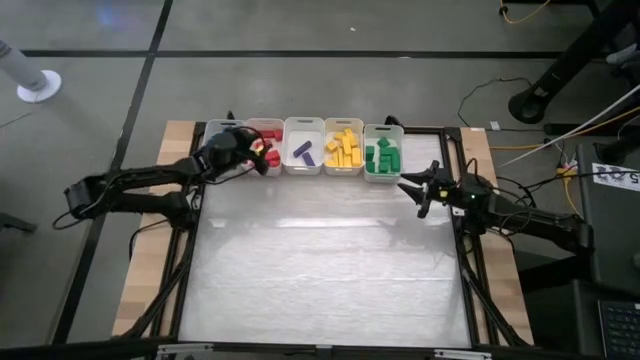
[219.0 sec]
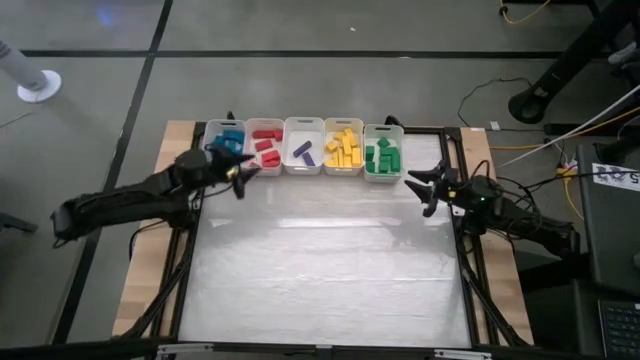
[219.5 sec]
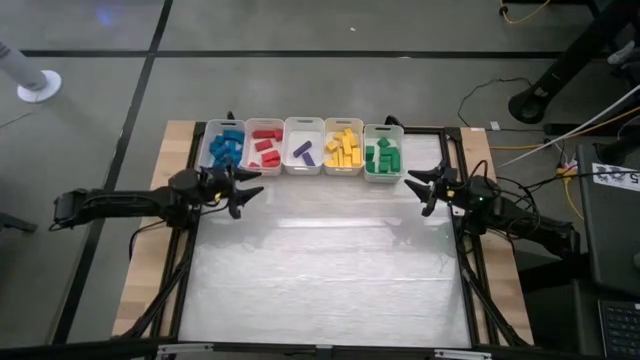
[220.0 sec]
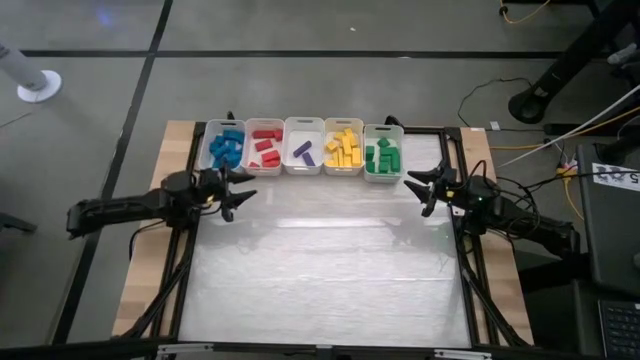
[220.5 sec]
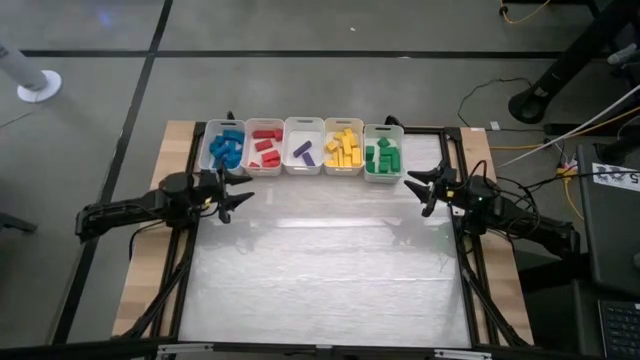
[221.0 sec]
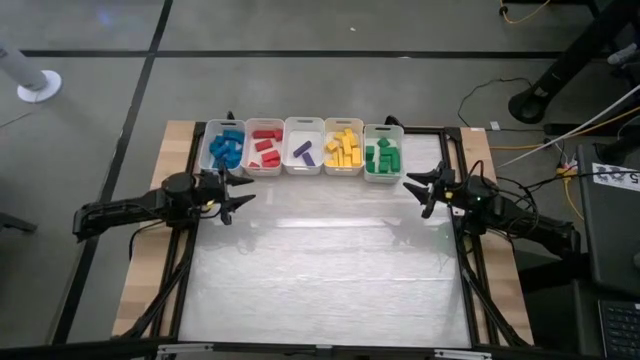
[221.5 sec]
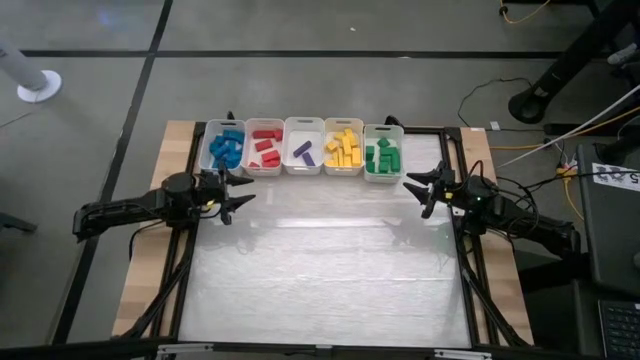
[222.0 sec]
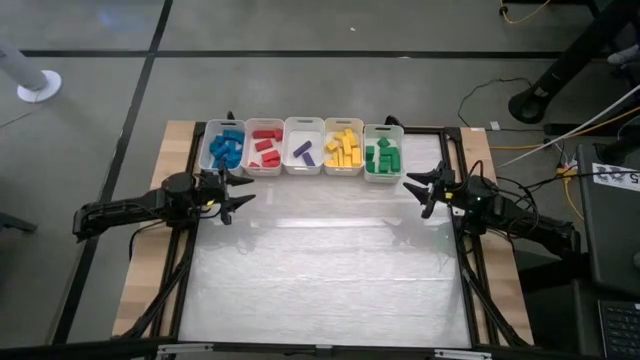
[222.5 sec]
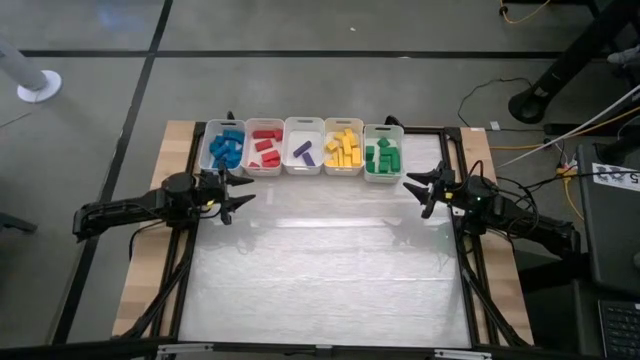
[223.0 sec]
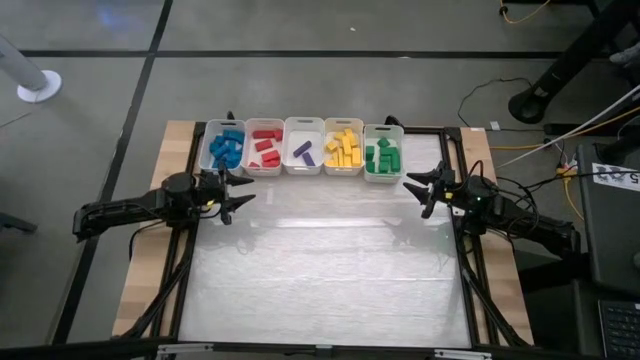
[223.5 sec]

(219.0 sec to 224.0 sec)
Task: Sort blocks
Return to Home Position

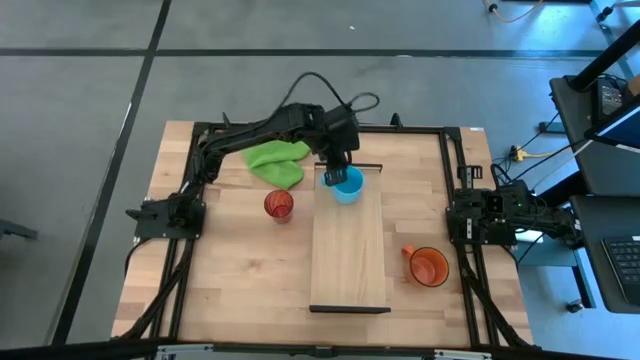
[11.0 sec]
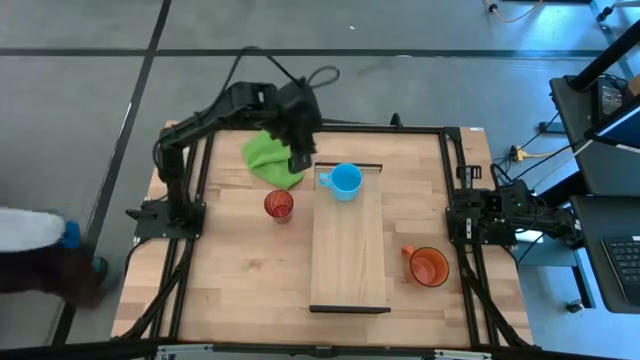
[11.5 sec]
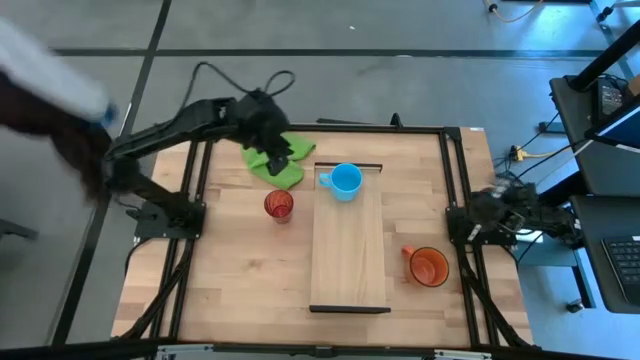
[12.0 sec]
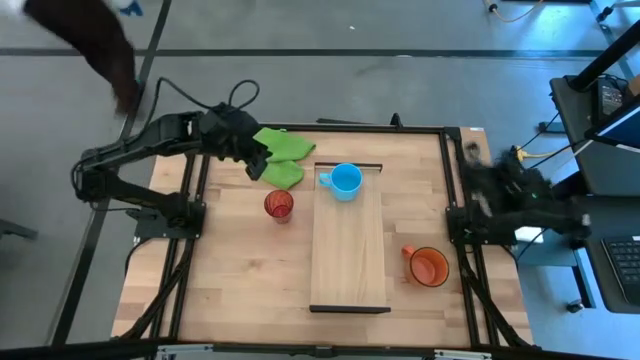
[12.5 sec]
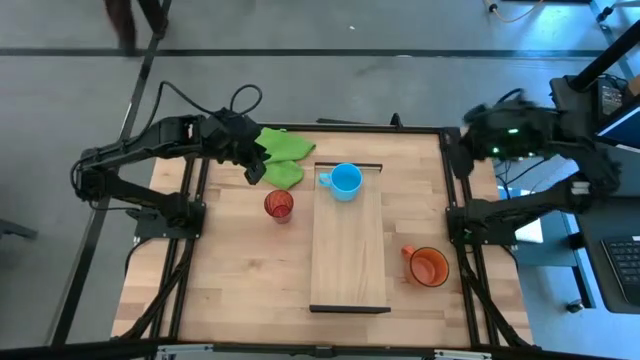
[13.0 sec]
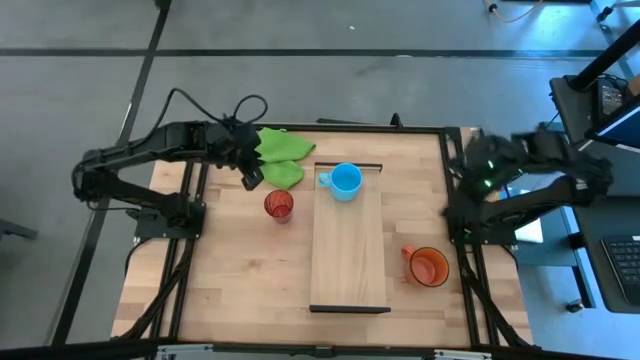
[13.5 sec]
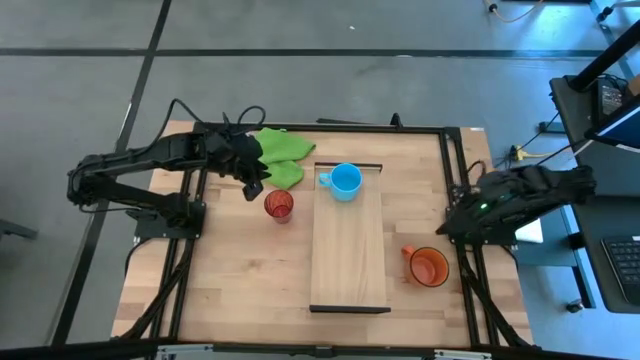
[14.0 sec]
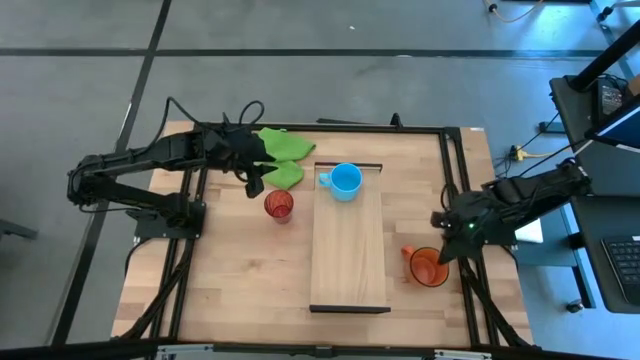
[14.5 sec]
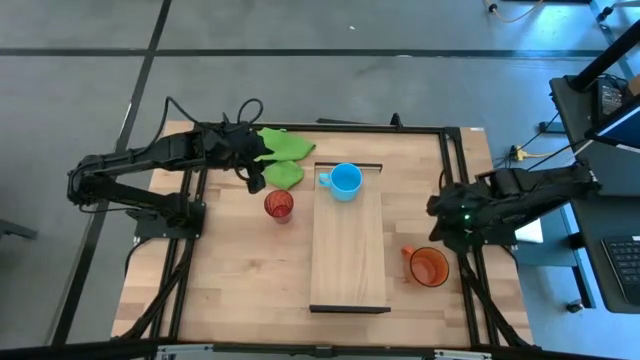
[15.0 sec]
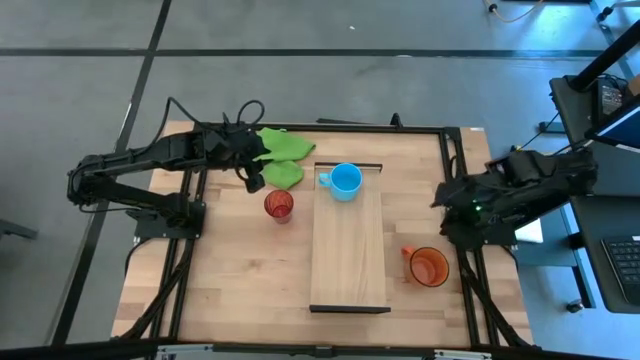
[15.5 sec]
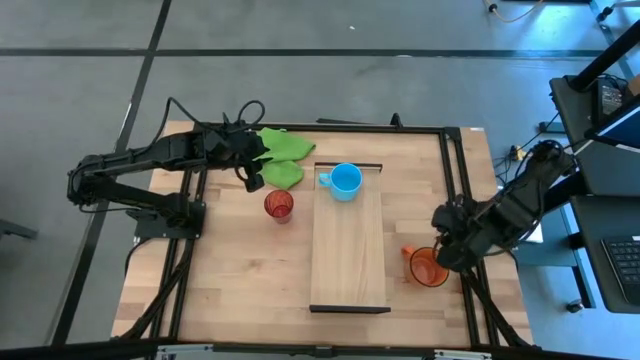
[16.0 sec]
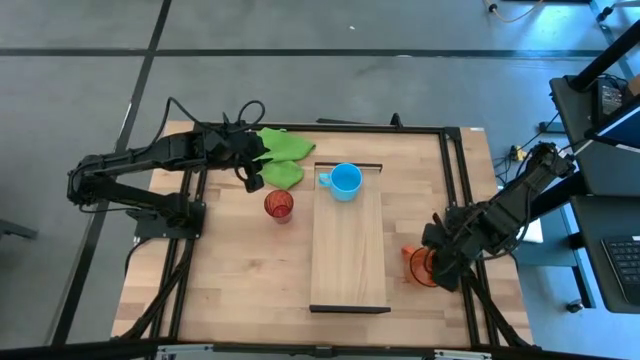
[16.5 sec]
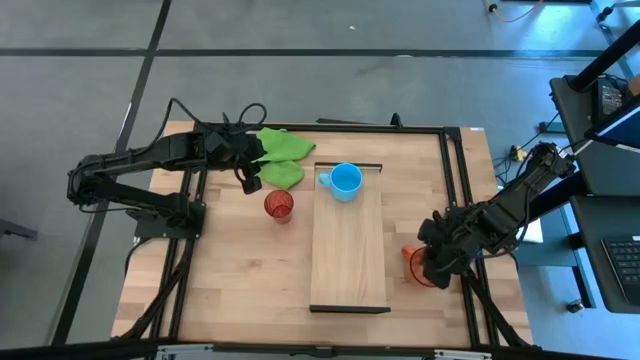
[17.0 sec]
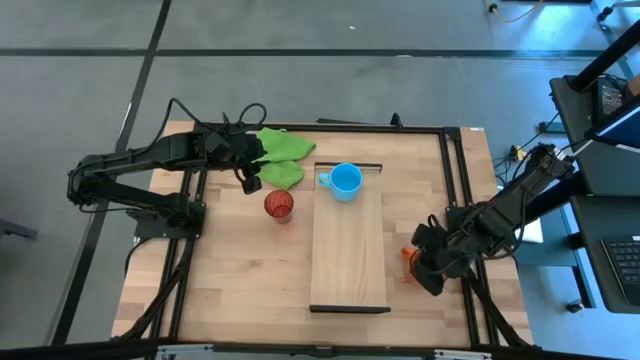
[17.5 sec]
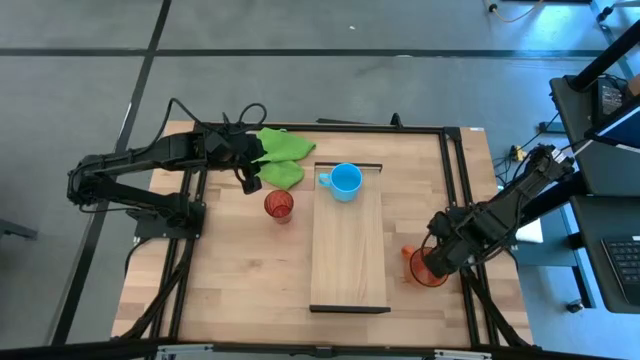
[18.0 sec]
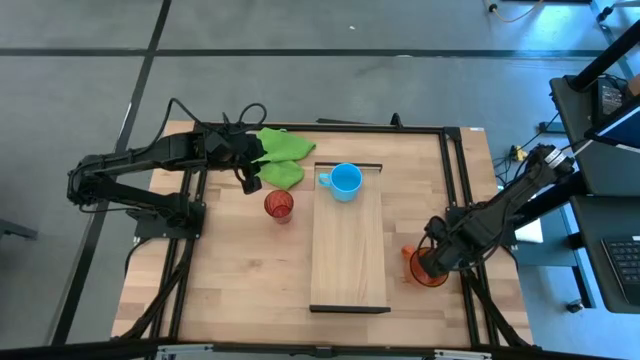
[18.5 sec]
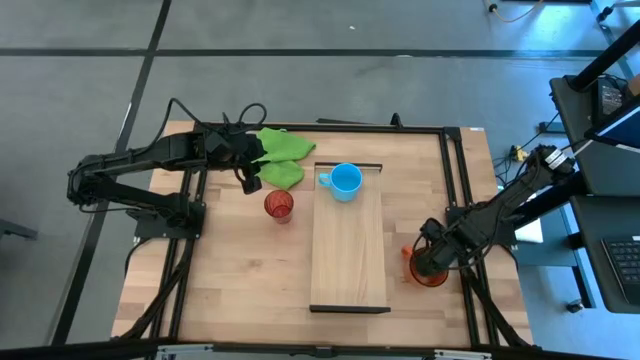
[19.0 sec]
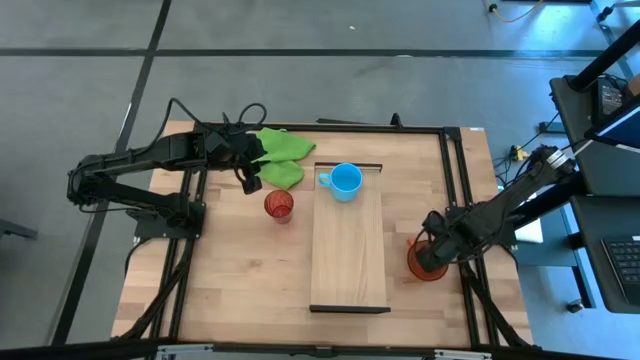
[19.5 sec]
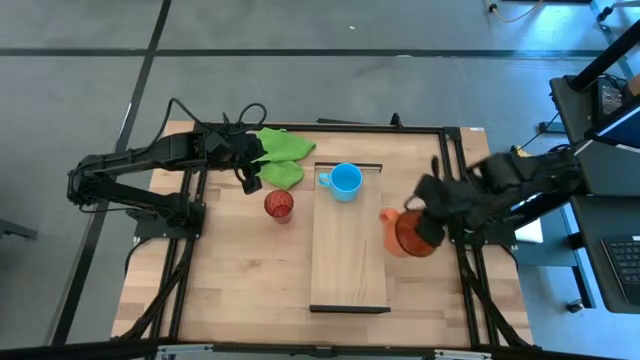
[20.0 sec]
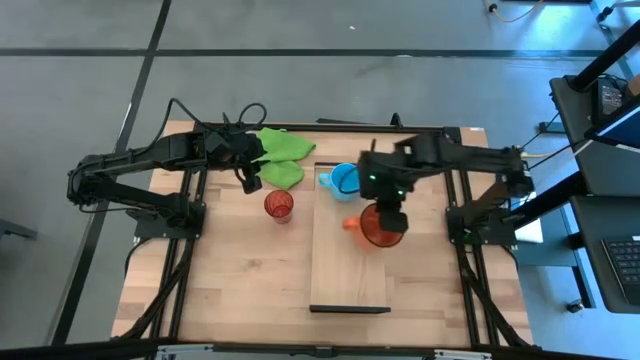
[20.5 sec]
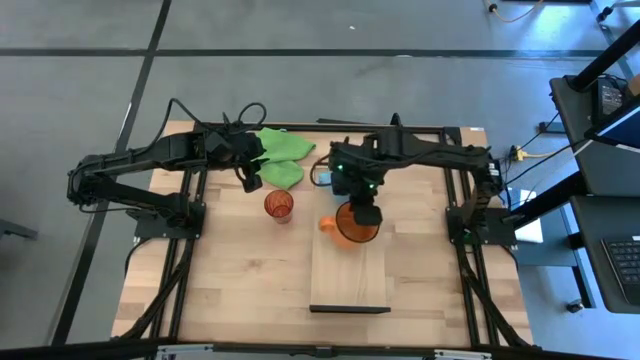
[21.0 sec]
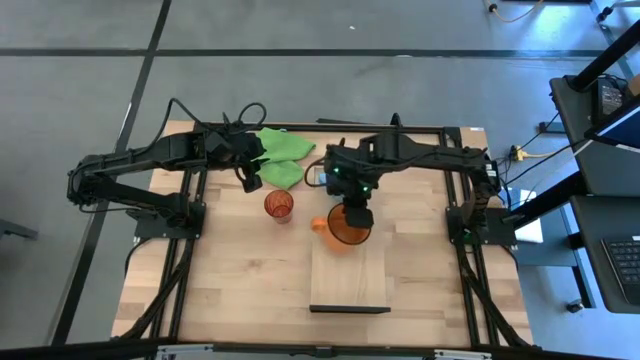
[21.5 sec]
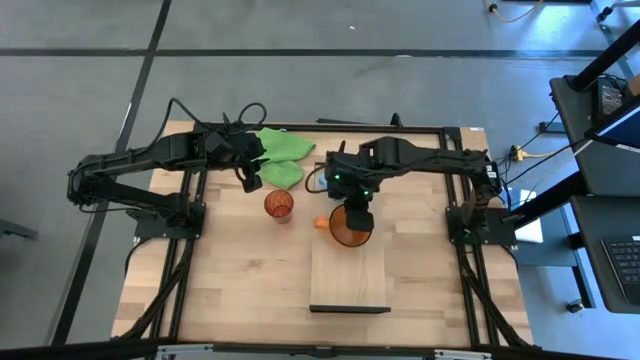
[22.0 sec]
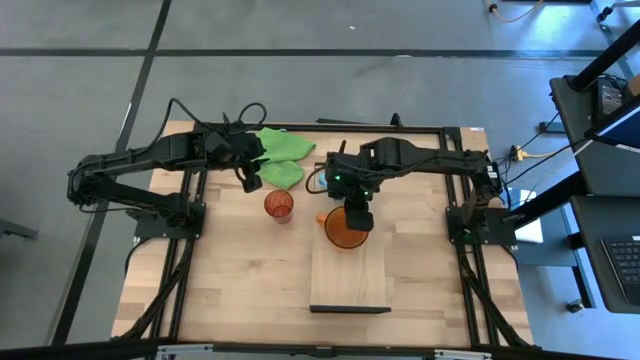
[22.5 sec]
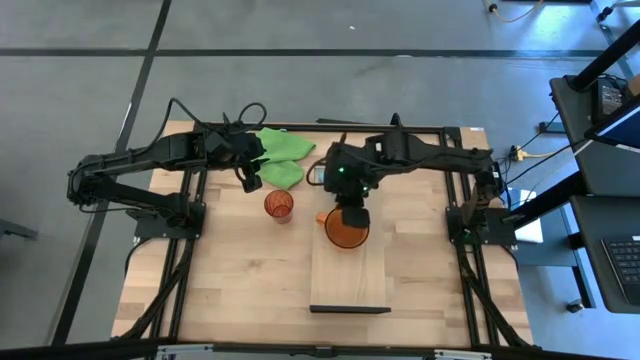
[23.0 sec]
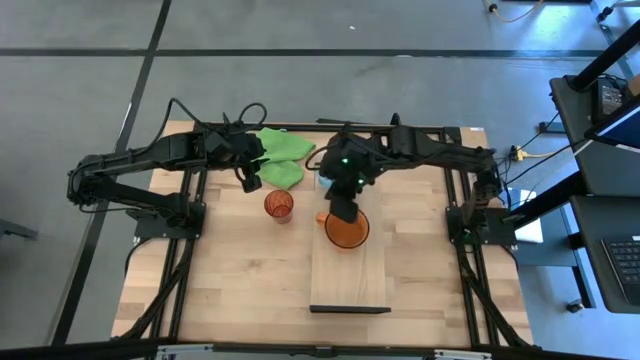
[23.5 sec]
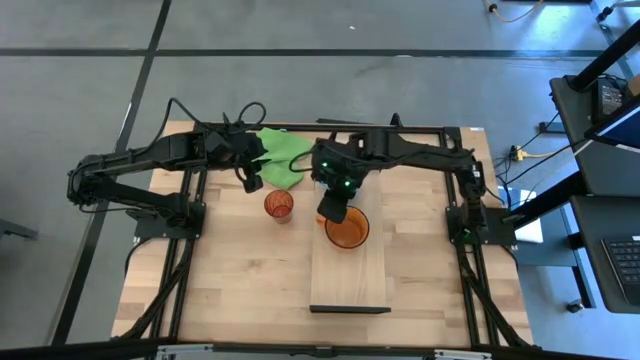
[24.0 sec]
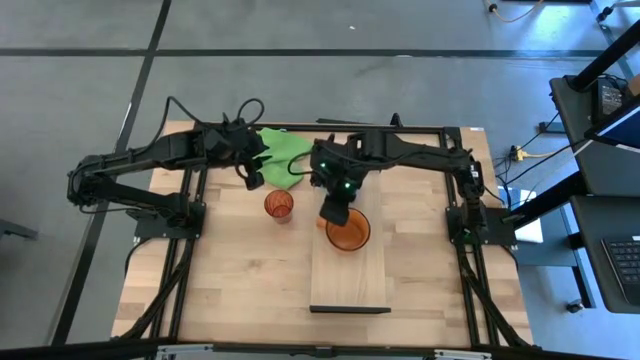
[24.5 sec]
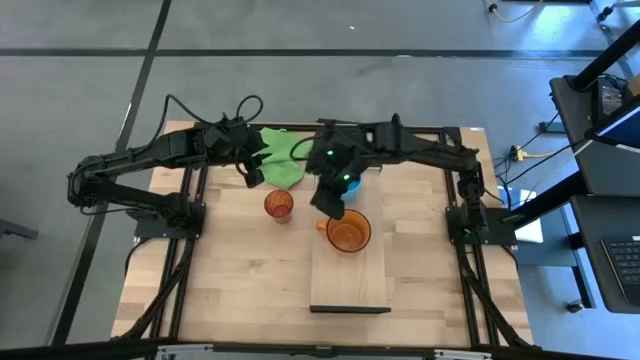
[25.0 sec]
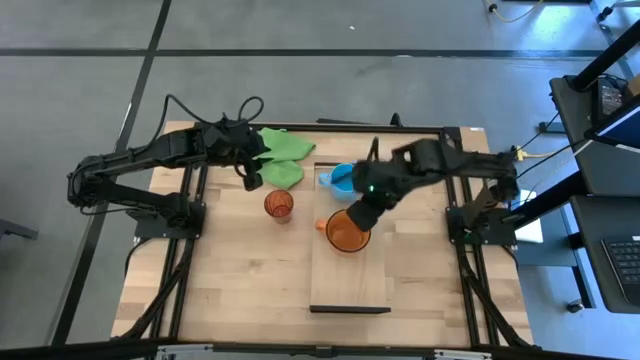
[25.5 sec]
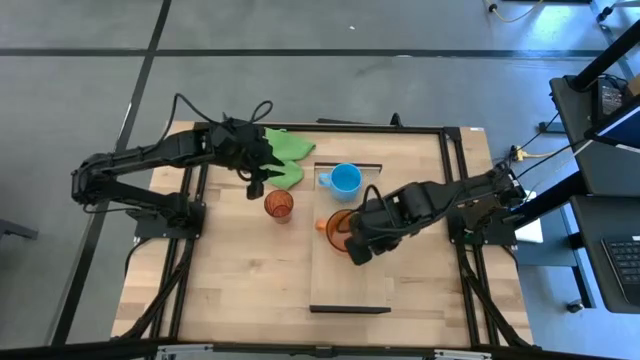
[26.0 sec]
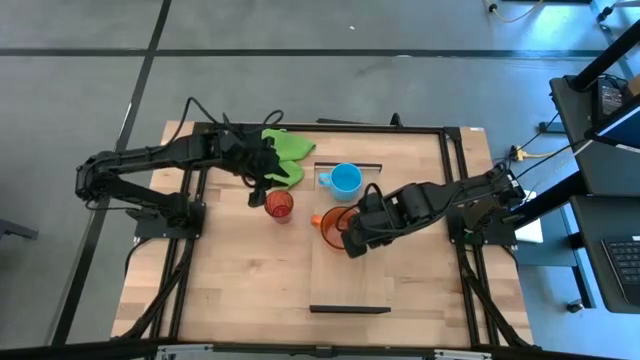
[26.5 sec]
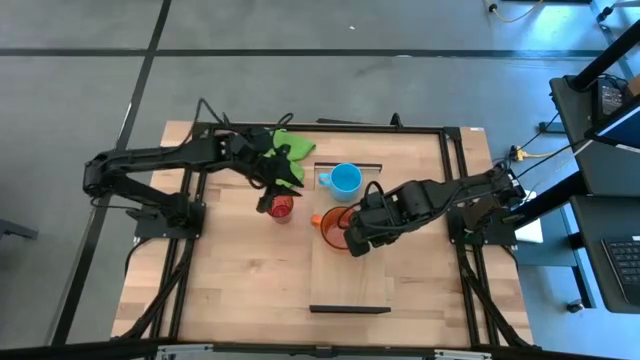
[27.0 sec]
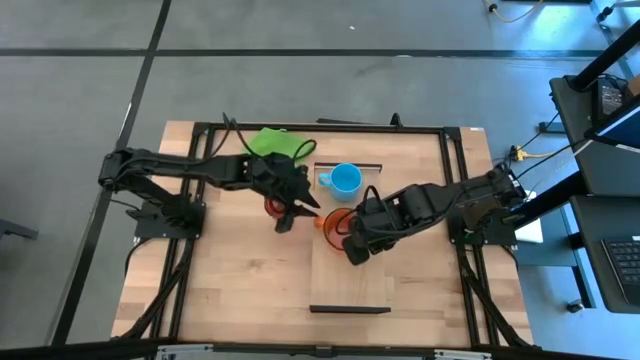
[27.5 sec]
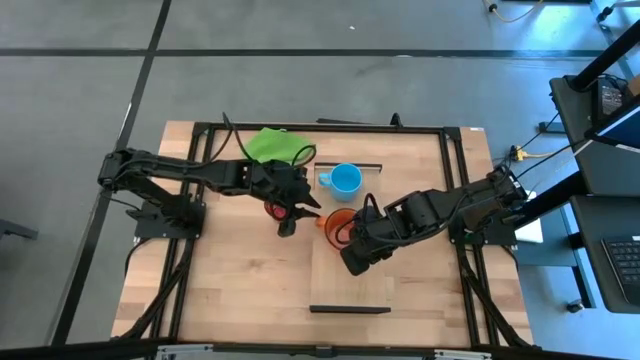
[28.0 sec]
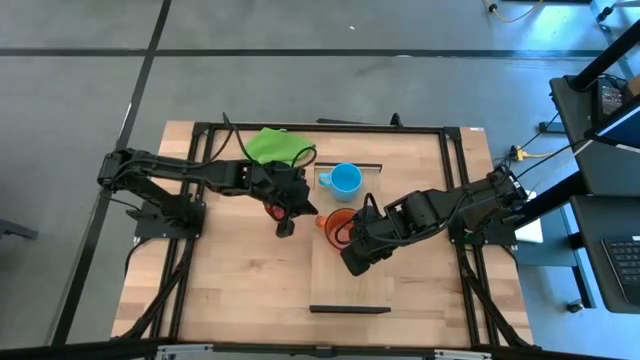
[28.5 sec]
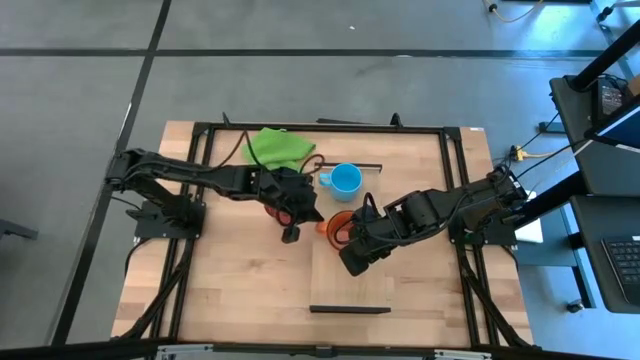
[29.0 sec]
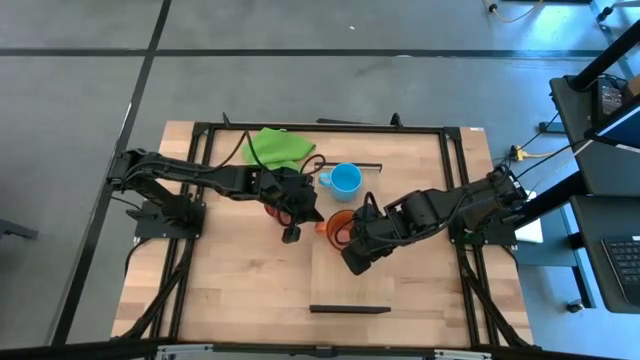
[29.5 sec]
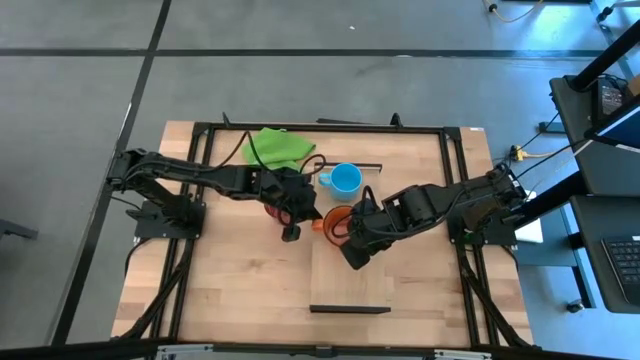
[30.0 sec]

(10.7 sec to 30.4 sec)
Task: Stack small to large cups/mugs on shelf
Put the orange mug on the shelf
